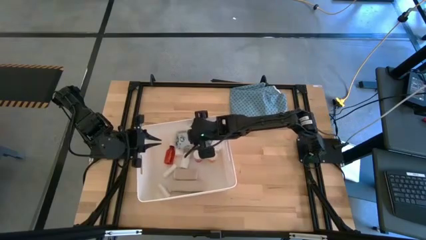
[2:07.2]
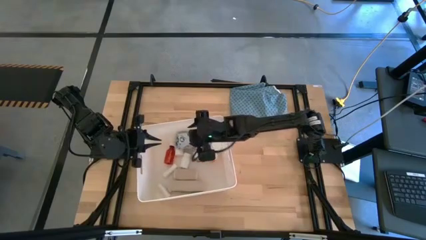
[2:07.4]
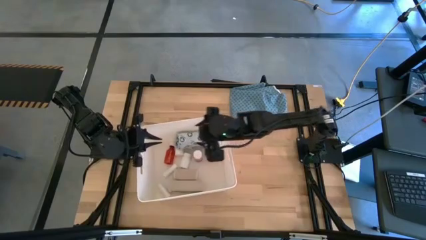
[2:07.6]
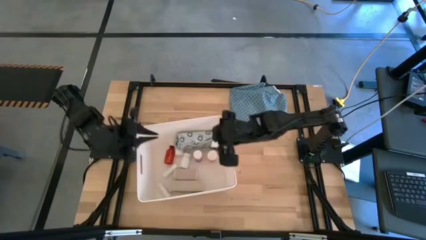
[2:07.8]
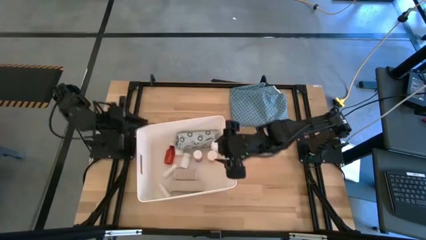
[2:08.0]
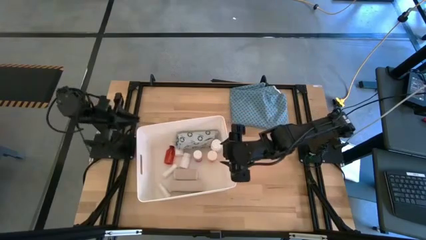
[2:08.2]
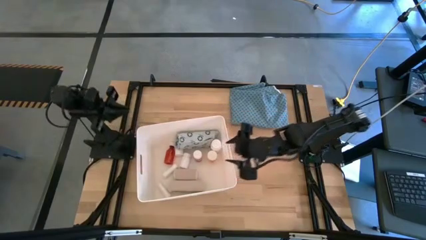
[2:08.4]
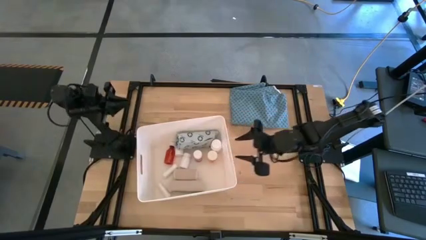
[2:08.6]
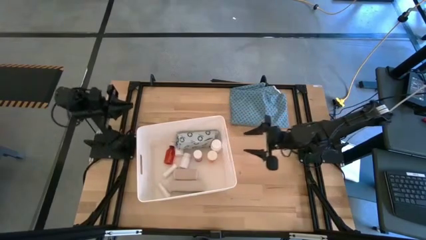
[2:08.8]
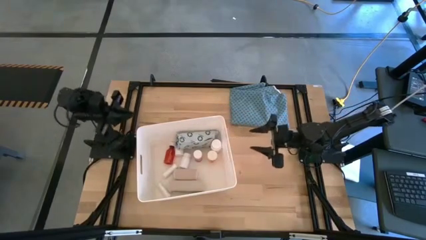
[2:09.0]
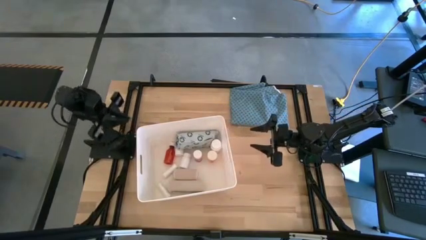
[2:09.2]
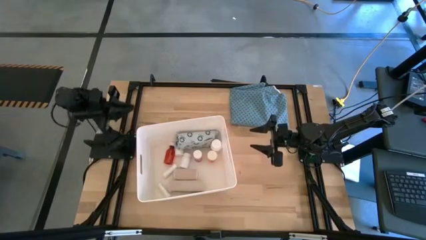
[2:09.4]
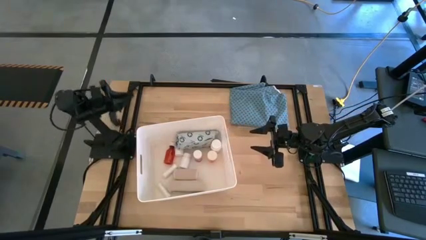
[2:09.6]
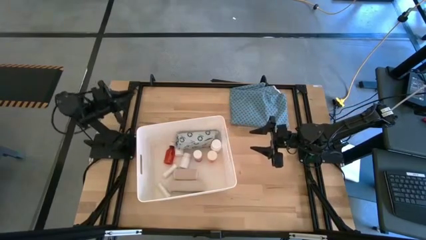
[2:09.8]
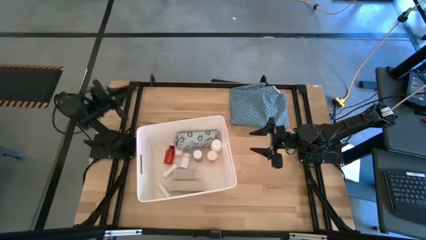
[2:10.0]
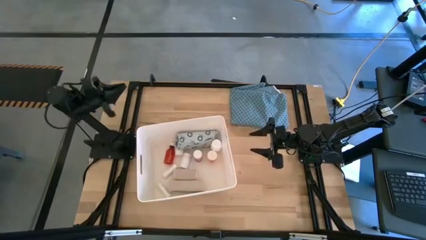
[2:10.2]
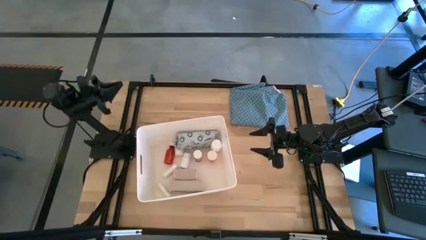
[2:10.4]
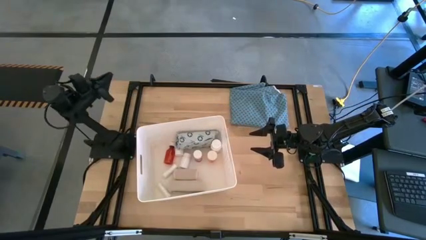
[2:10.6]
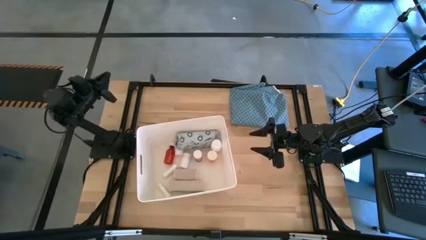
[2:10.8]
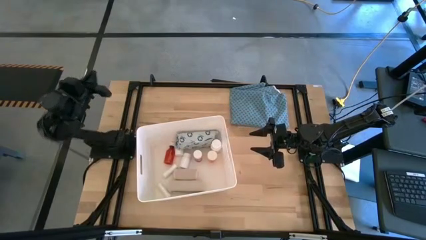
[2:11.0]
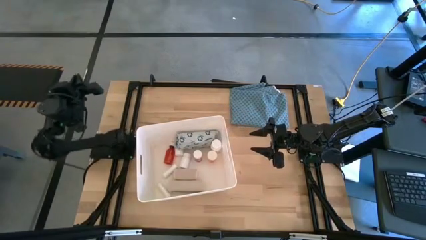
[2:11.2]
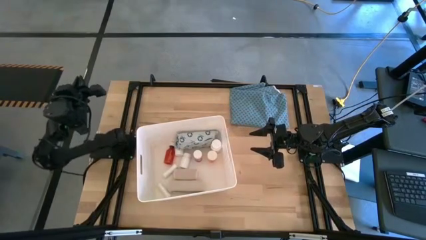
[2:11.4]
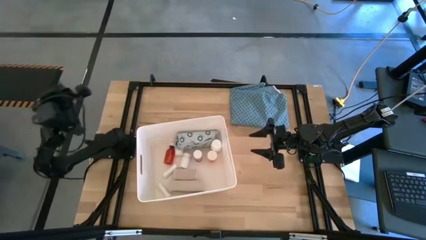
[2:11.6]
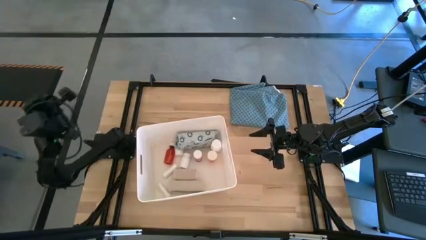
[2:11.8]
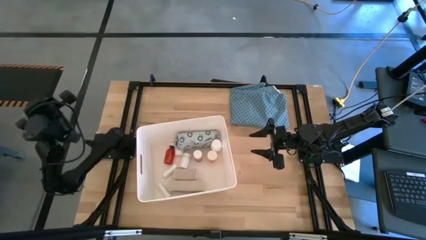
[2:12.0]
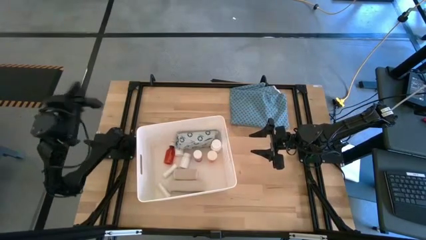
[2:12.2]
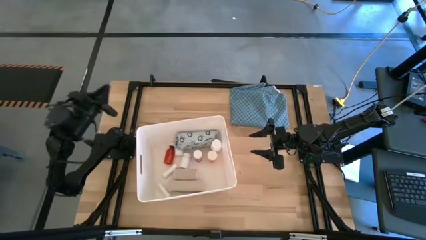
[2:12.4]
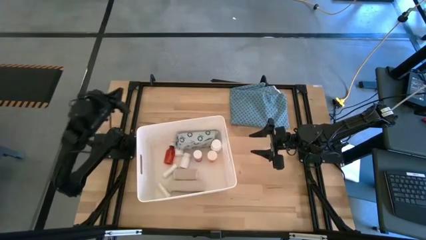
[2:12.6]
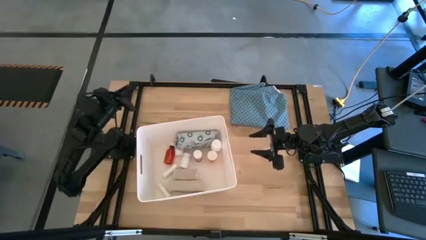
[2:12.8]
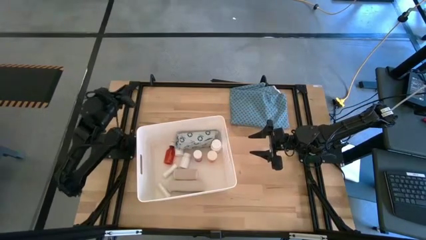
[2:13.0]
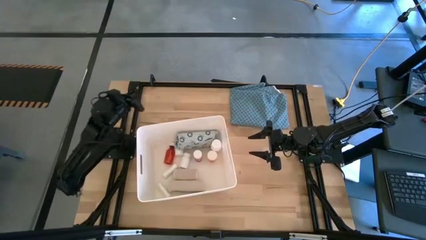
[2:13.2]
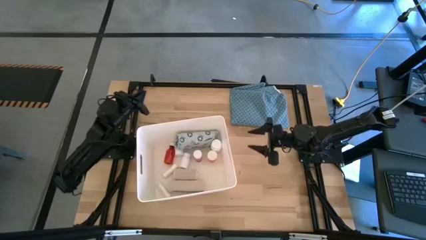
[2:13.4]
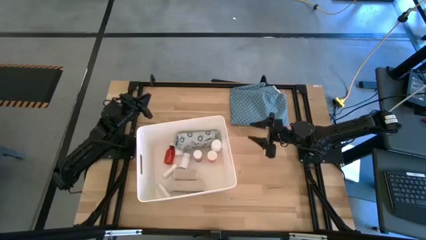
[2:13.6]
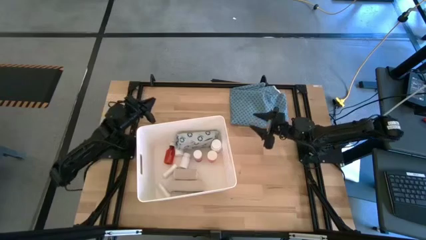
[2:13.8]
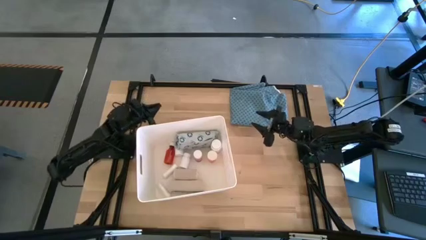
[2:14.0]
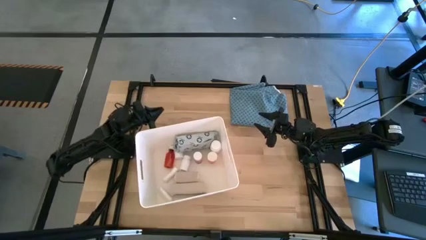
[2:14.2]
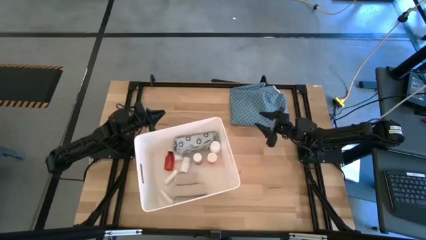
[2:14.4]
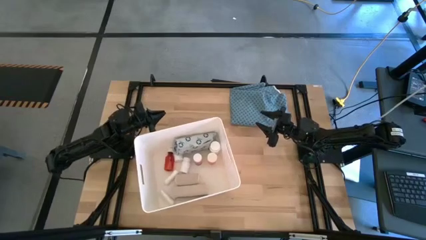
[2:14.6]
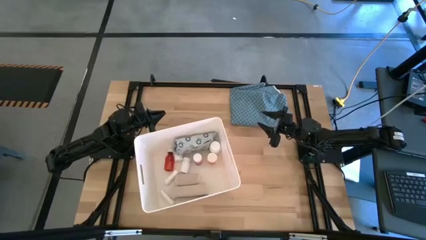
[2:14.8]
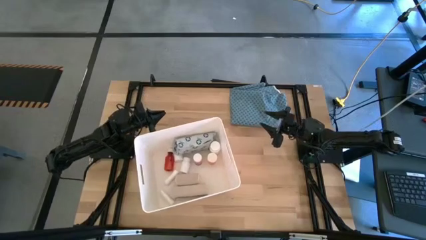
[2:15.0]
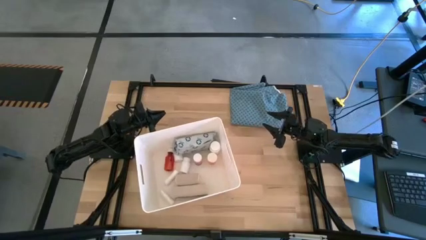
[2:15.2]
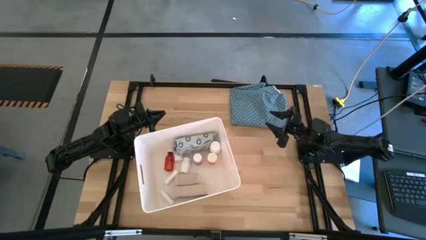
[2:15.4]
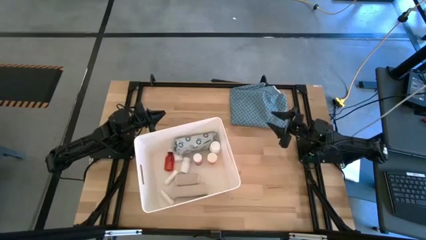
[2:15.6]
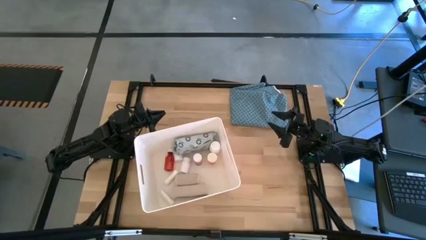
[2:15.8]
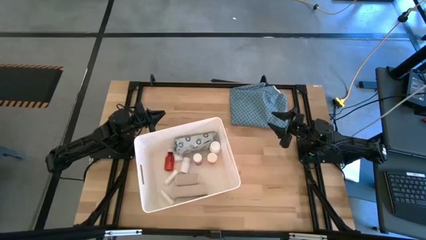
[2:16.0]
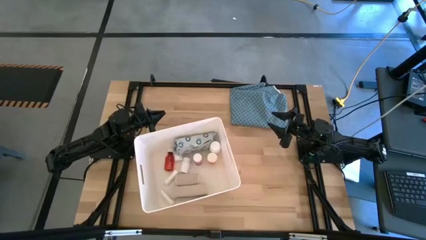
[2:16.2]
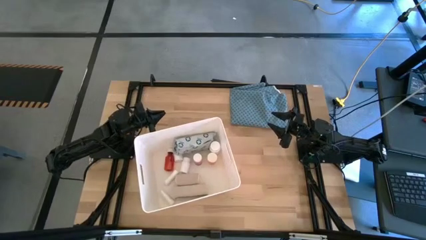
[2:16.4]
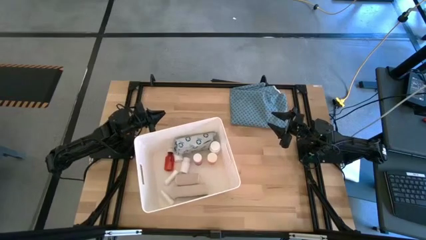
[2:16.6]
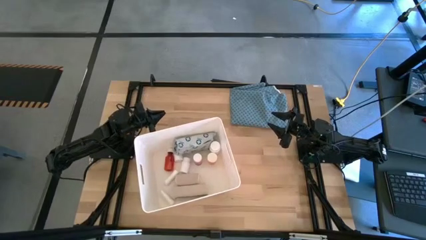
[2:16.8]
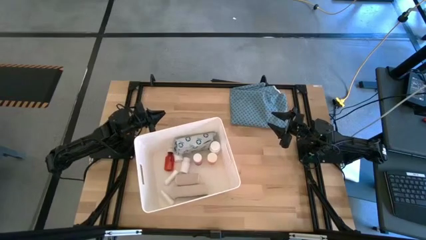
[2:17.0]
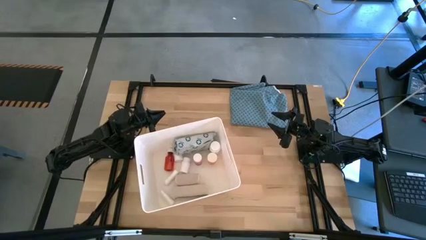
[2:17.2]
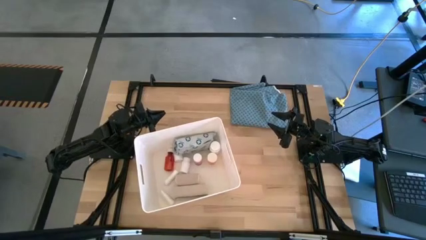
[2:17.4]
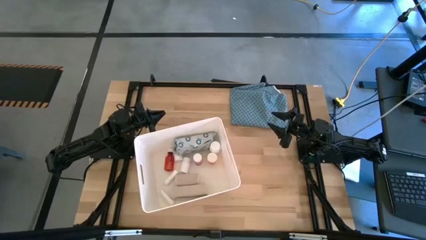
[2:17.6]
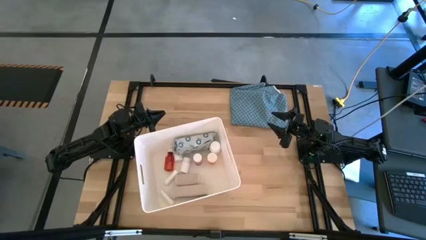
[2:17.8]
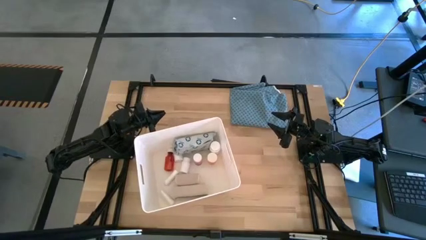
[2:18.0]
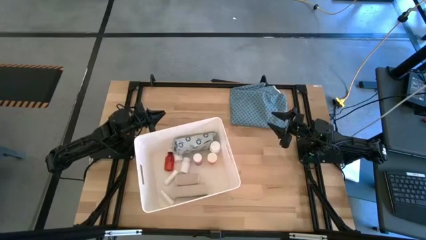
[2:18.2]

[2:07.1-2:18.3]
Task: Pick & place medical supplies in basket/bin
Return to Home Position
